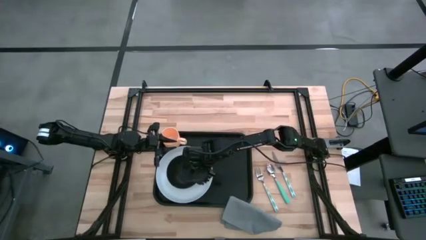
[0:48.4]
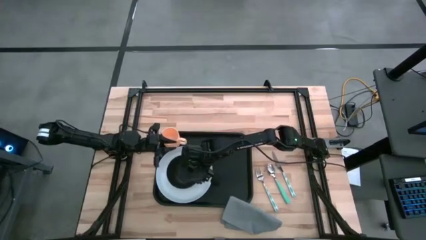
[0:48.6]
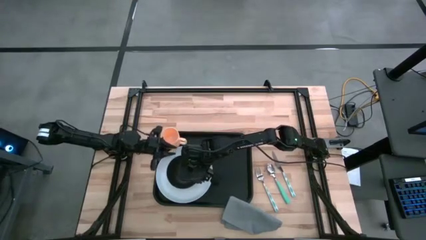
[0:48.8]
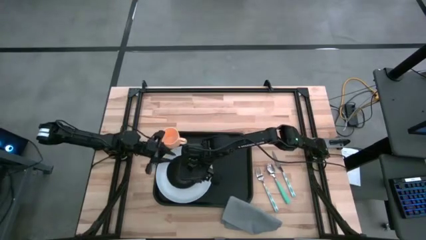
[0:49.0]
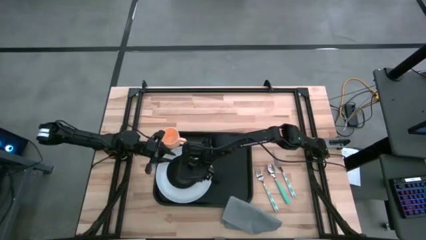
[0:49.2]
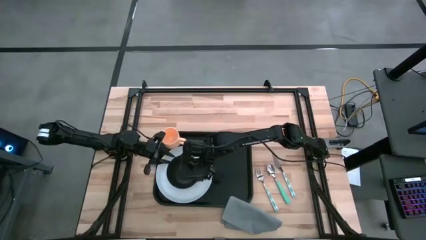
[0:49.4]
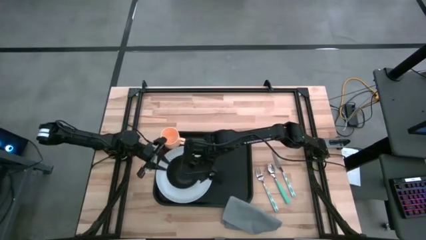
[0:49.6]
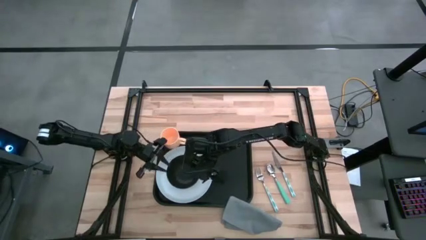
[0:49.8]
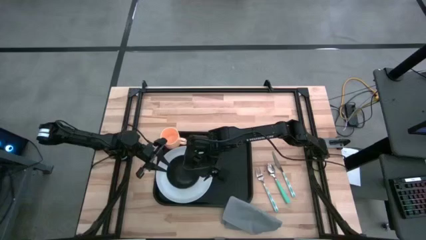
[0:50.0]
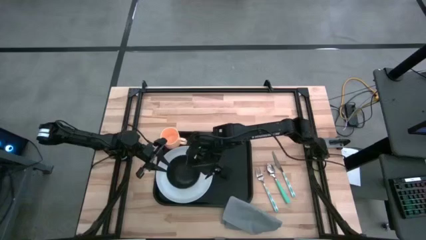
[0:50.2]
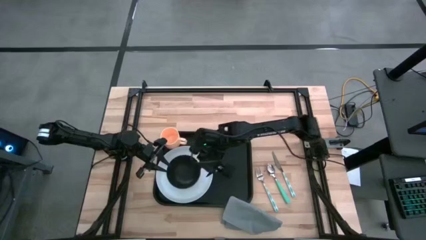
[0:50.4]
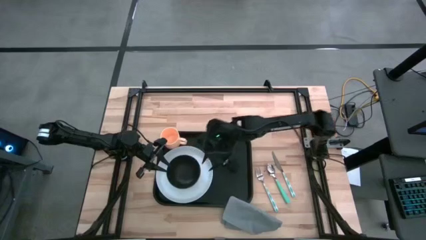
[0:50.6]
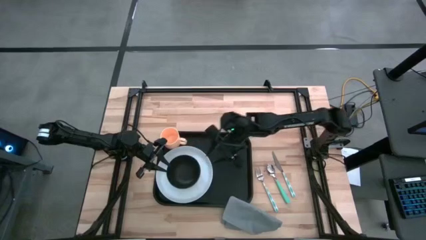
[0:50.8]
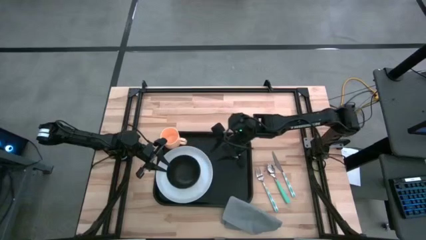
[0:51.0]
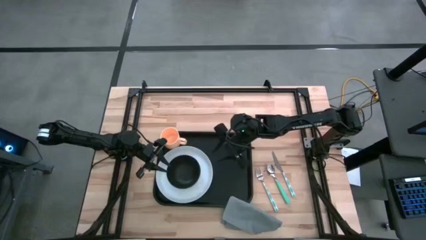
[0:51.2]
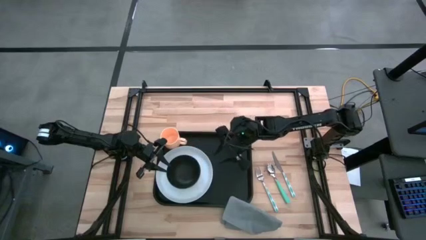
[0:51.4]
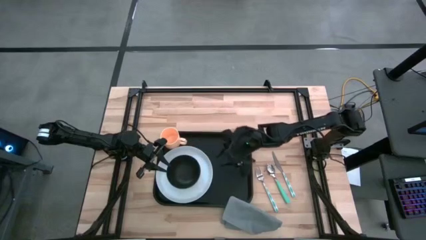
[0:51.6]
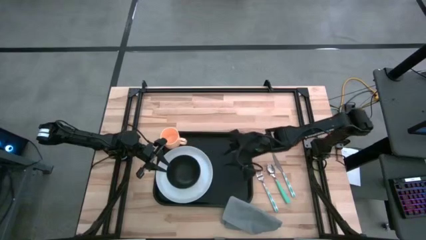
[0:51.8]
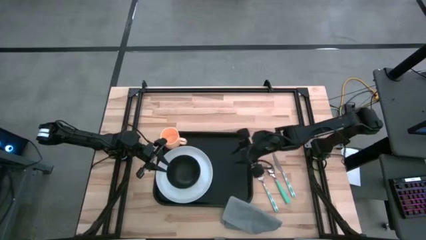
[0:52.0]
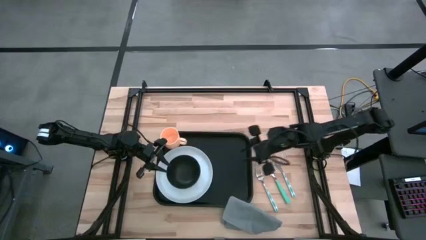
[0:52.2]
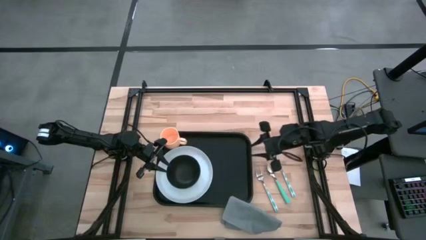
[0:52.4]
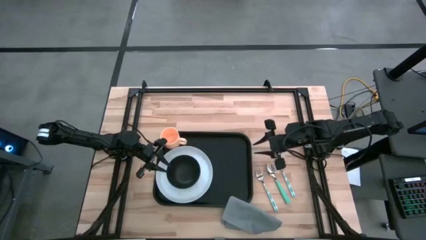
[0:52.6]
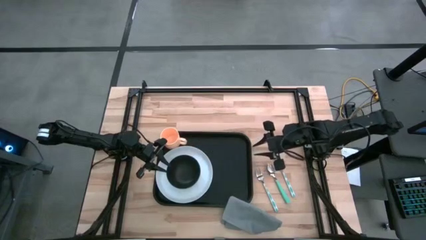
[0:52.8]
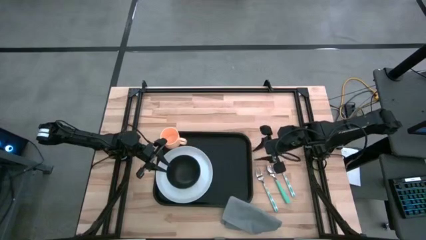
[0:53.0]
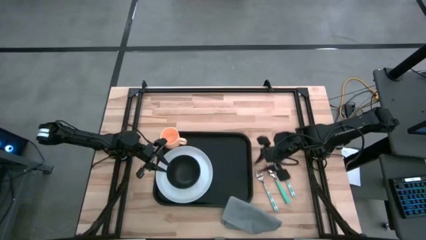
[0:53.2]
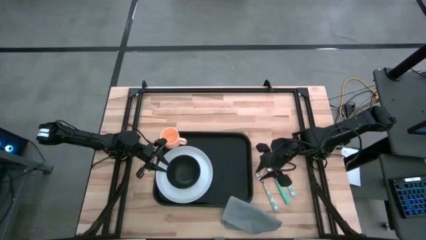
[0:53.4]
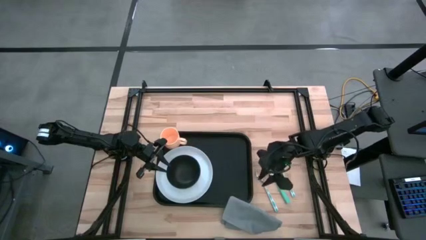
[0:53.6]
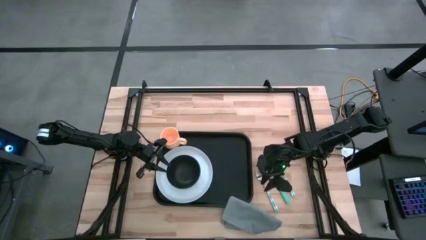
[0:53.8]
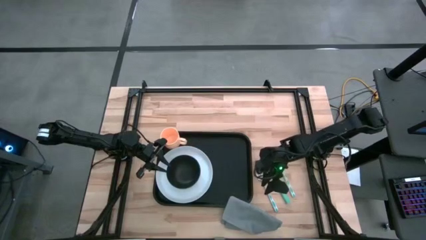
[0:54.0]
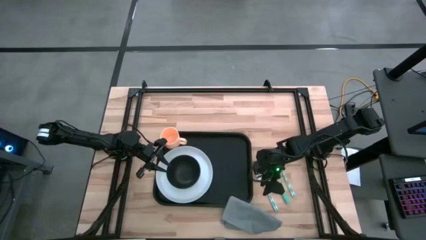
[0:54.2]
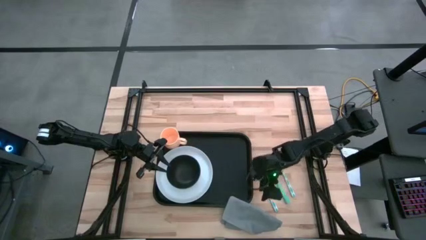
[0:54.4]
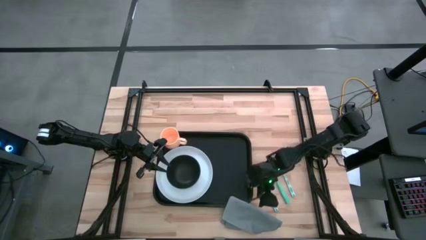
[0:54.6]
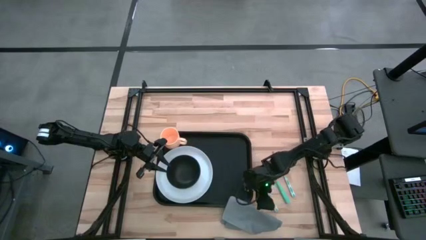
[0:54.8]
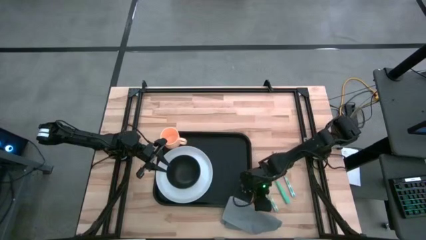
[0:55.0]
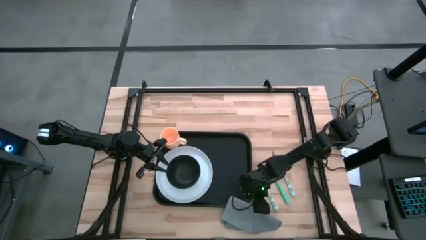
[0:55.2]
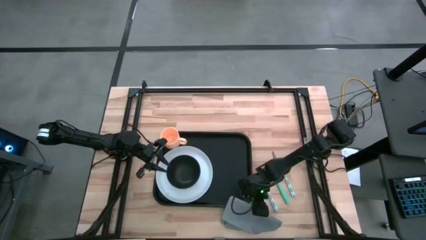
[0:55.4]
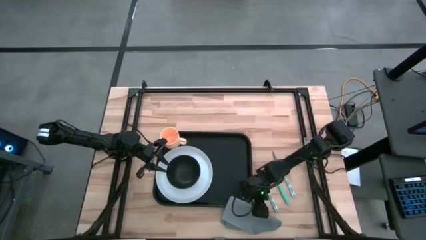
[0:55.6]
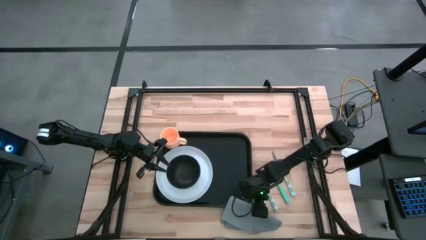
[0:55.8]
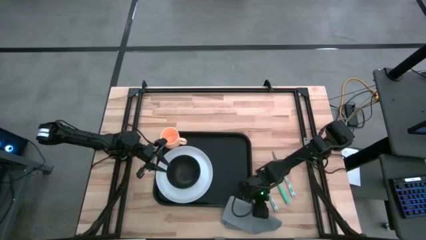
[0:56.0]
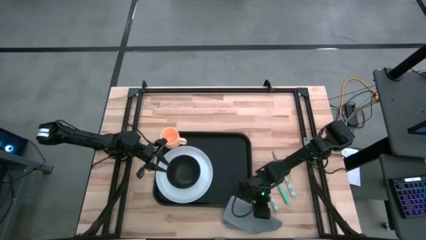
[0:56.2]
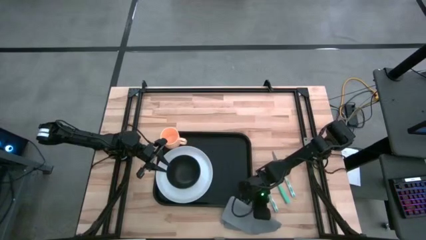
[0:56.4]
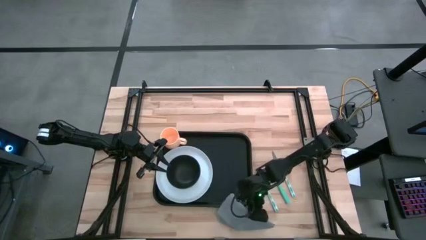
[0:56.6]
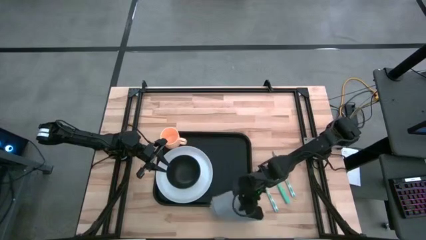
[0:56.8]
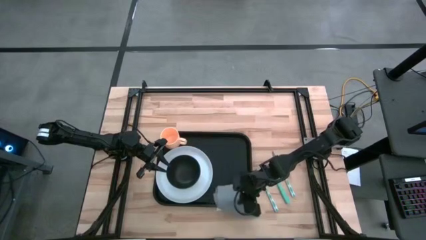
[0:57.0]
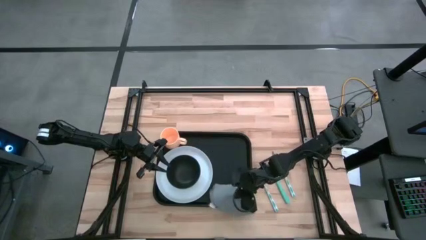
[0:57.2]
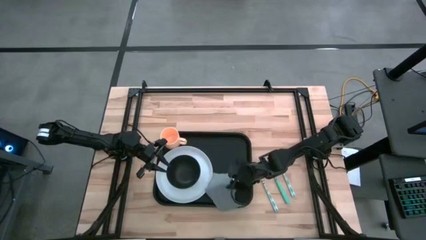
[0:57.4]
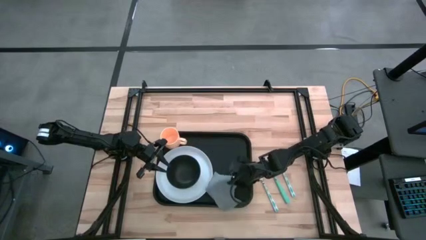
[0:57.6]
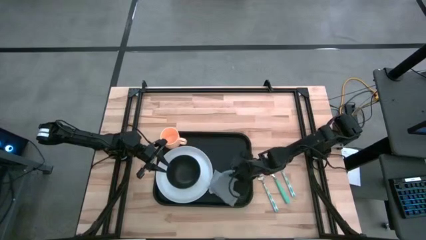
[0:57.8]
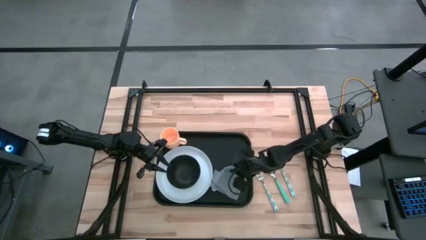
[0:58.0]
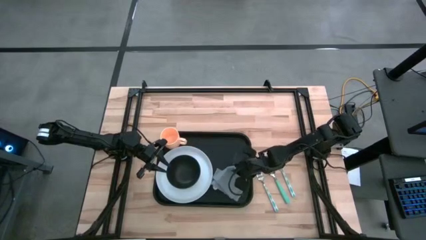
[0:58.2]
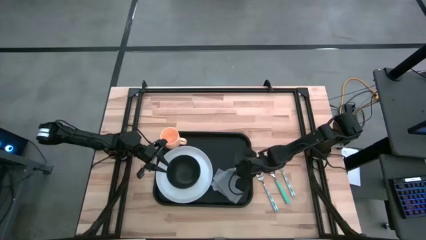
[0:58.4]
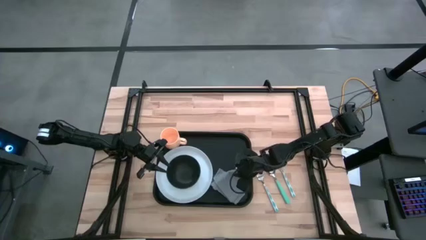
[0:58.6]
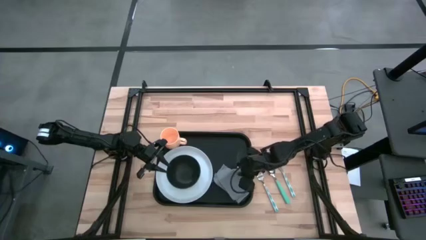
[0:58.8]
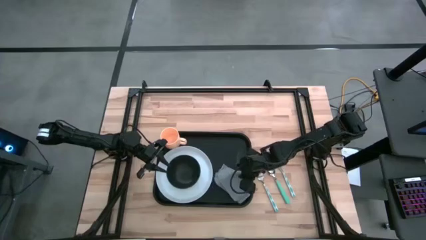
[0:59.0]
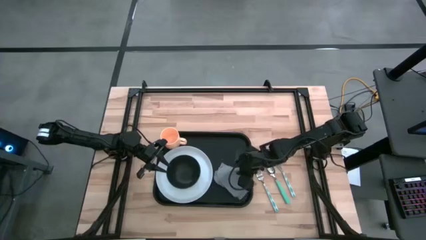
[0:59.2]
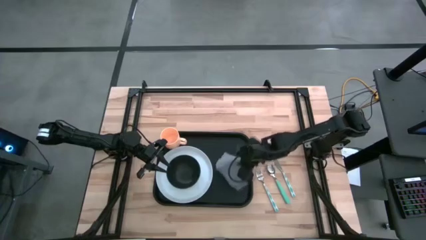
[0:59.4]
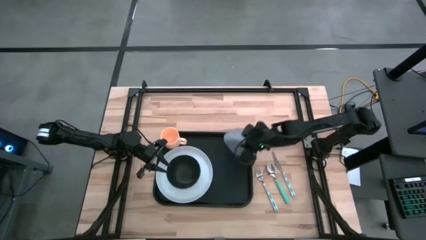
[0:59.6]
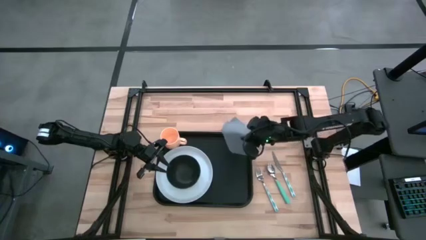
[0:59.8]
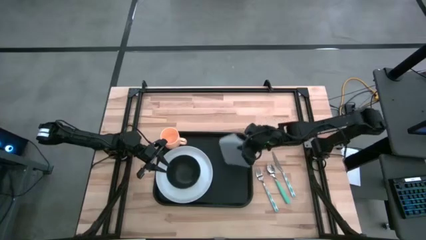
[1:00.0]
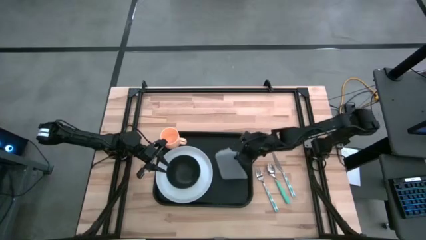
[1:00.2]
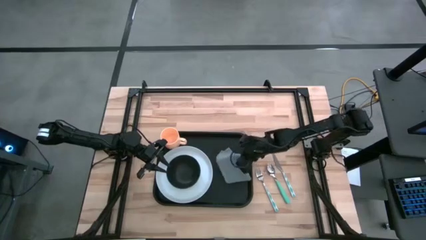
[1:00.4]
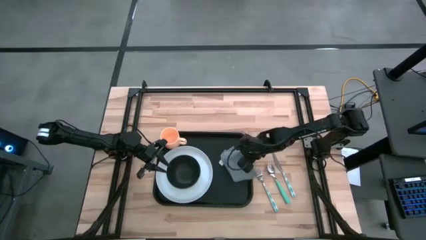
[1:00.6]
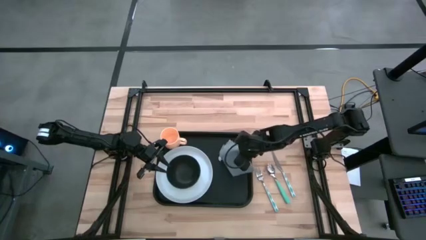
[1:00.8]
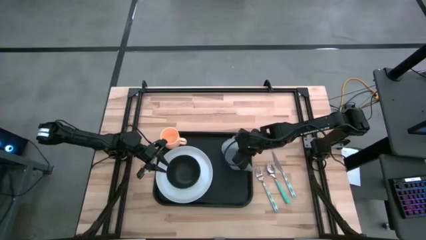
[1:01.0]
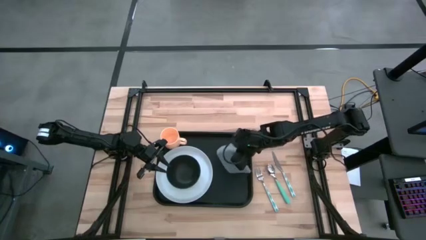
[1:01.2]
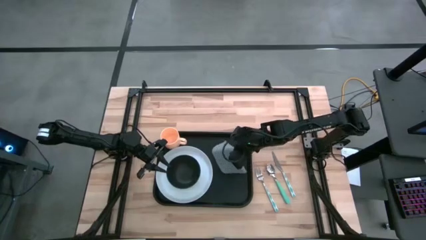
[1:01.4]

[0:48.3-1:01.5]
Task: Set up tray
Put the napkin on the serving tray to the right of the plate
